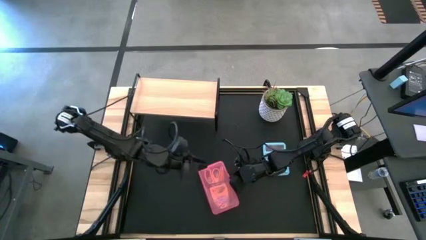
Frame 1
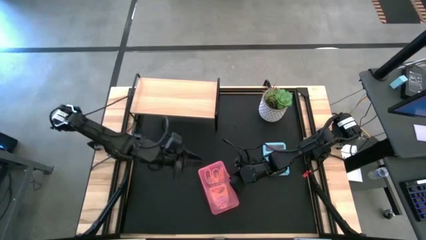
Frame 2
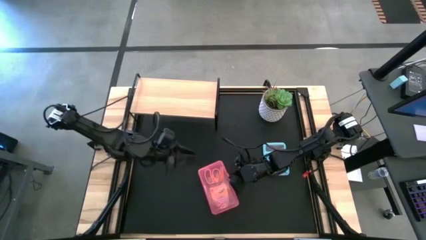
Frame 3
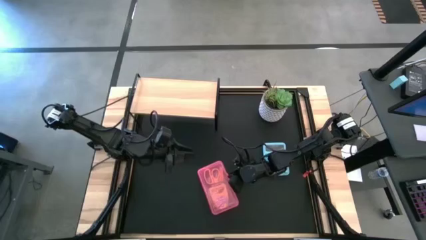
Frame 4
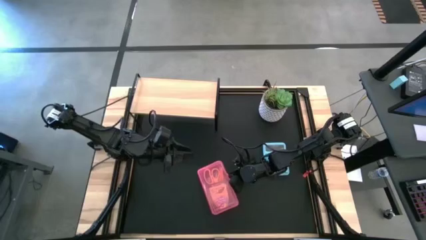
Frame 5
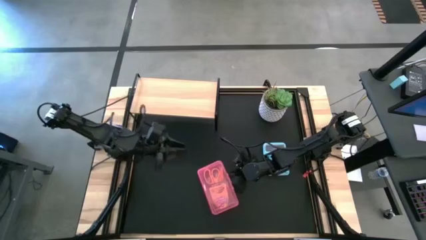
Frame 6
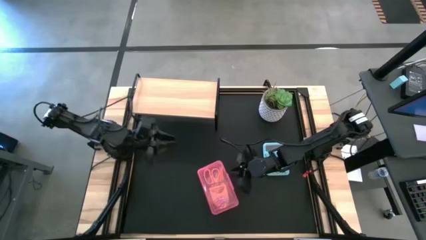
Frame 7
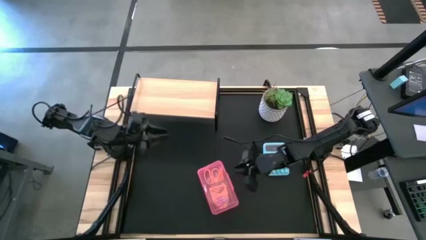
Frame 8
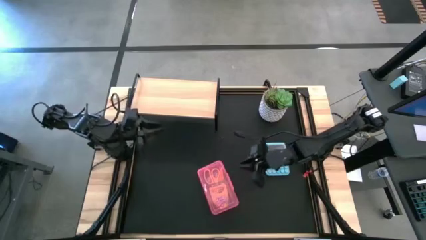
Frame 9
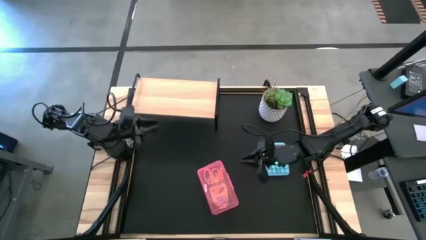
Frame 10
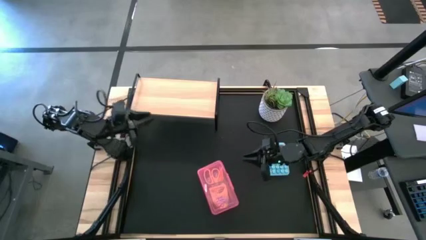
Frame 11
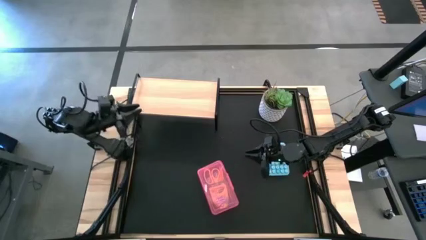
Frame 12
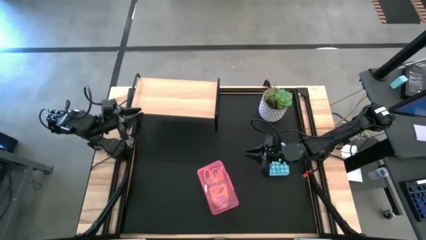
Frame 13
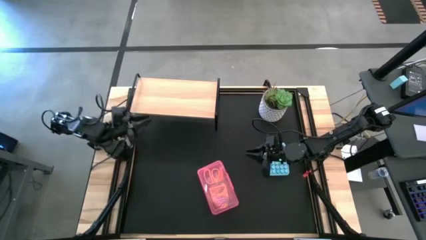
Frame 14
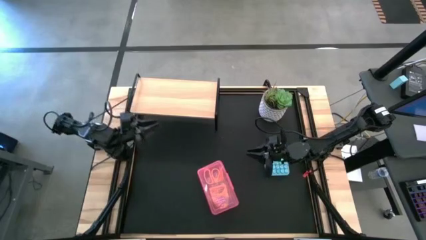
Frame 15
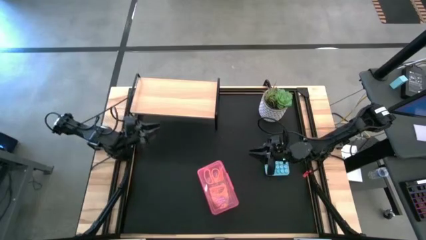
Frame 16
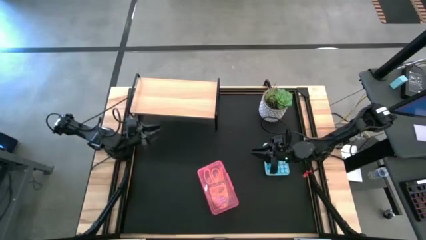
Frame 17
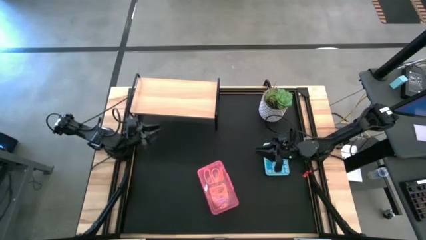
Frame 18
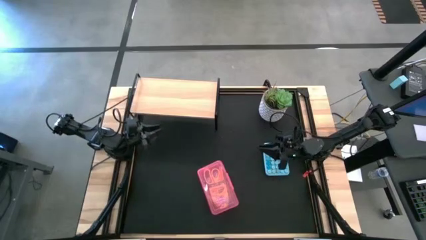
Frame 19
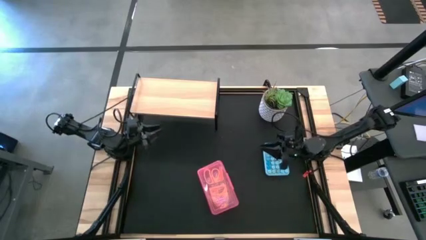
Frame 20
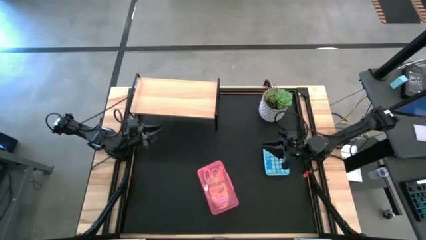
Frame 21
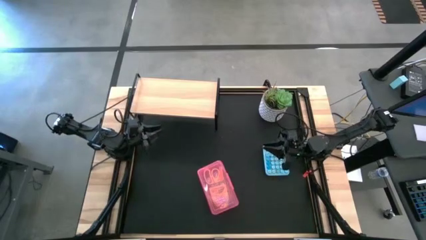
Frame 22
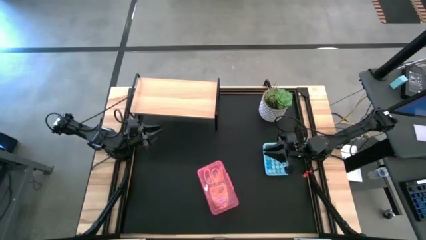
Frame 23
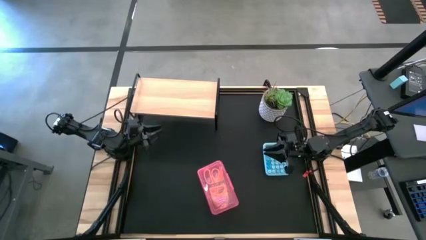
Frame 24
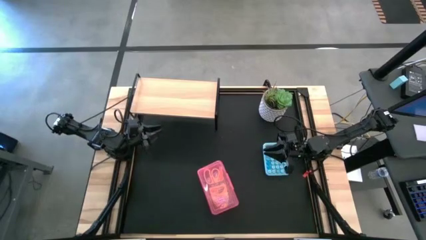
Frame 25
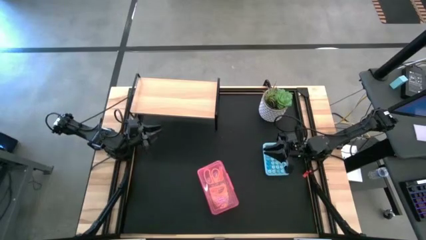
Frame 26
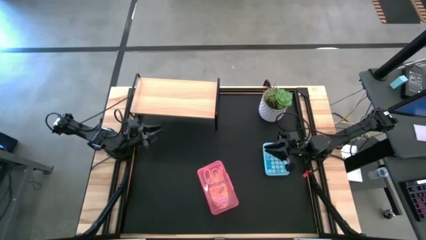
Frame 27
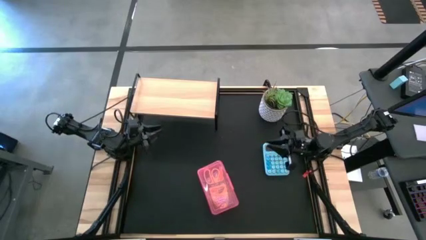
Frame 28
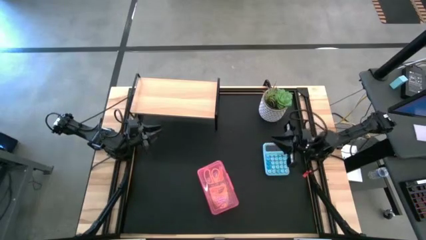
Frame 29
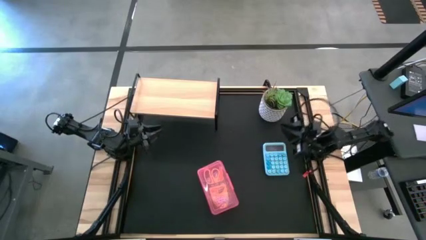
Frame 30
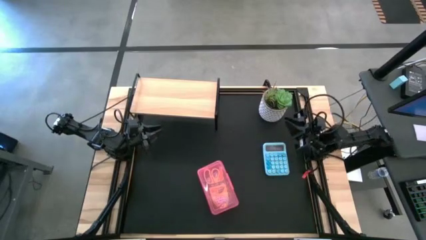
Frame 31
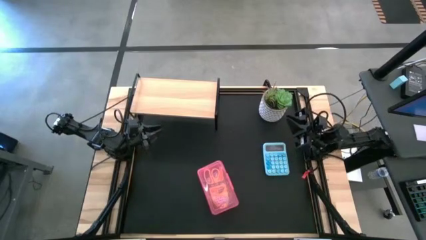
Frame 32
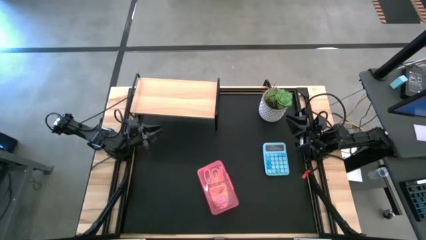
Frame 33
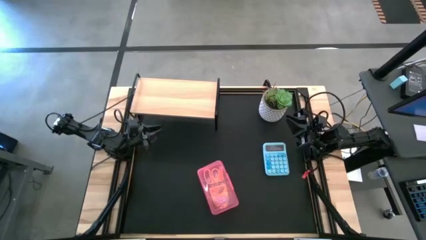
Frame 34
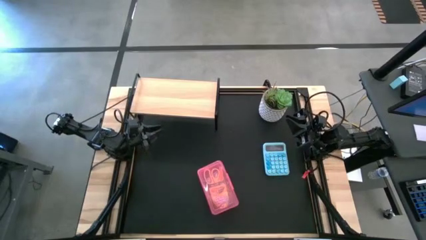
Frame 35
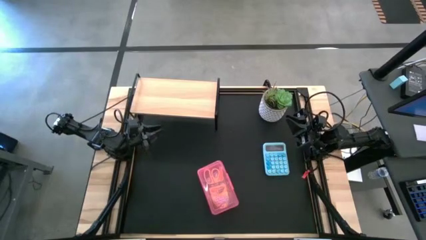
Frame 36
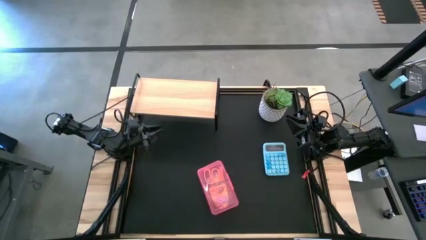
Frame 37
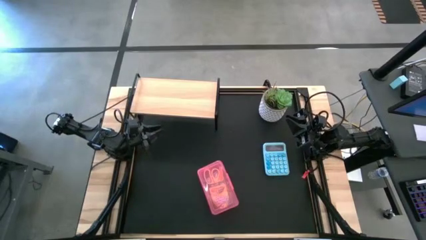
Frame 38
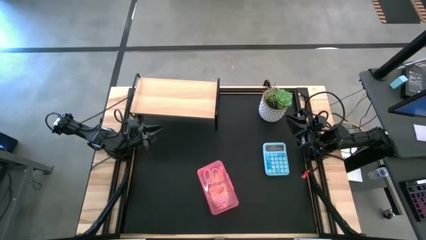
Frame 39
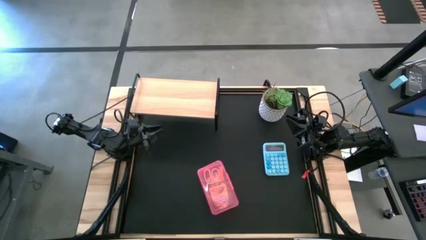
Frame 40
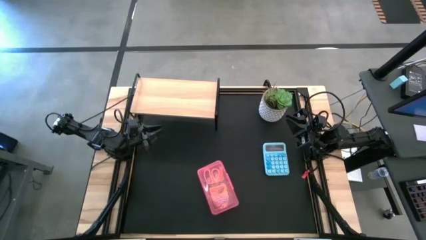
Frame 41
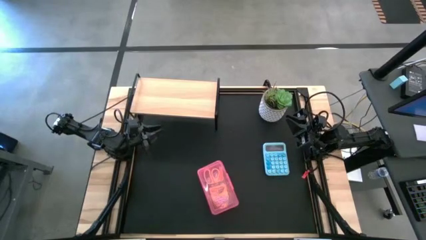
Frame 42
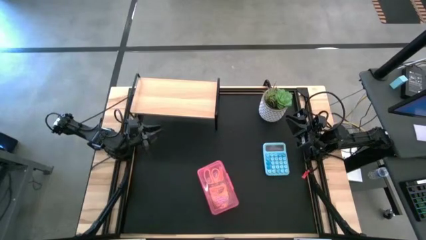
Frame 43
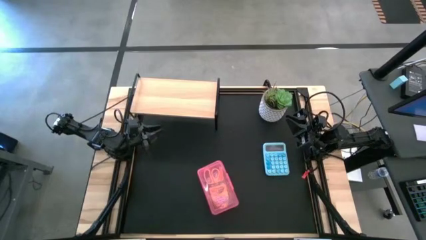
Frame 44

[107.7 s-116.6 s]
Task: Pack school essentials
Return to Home Position

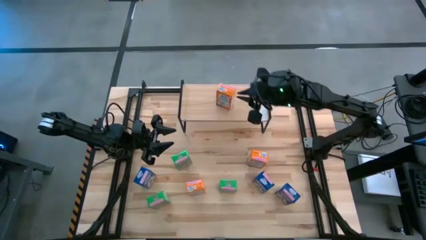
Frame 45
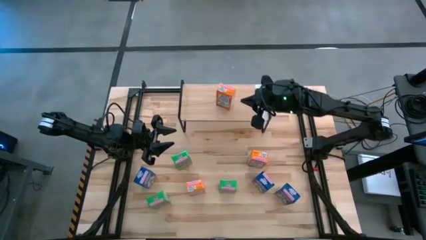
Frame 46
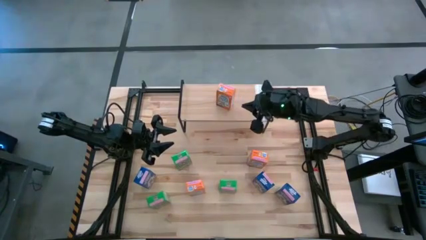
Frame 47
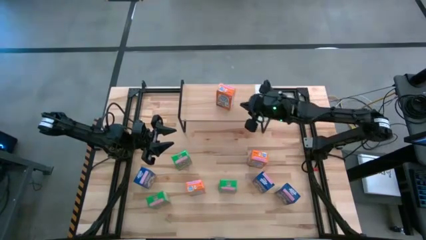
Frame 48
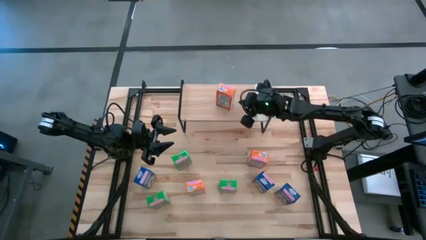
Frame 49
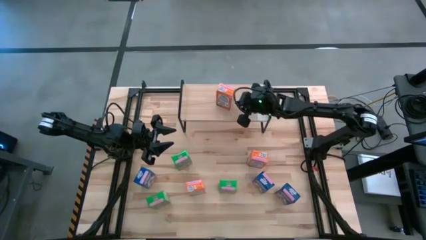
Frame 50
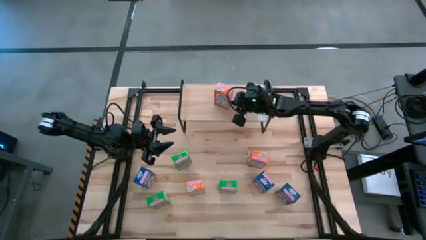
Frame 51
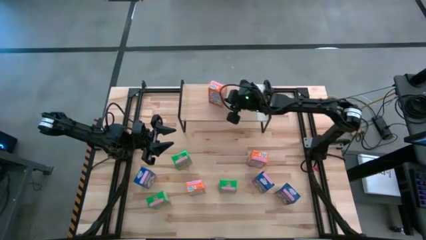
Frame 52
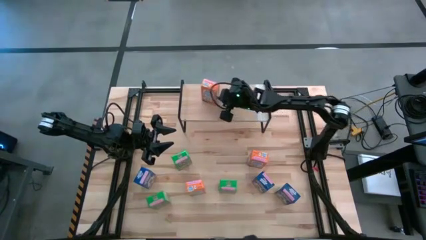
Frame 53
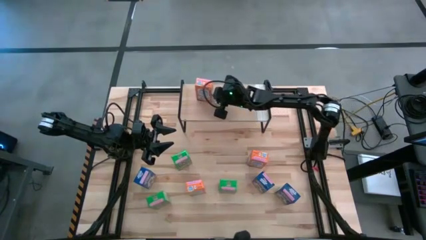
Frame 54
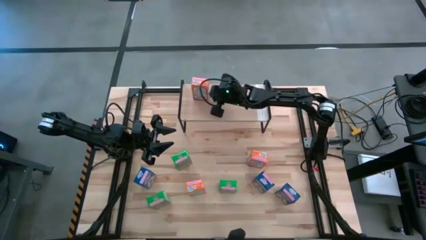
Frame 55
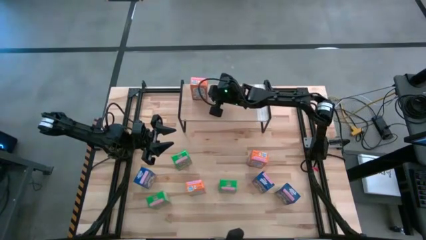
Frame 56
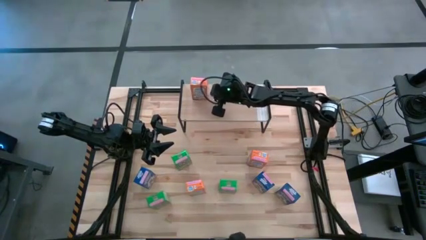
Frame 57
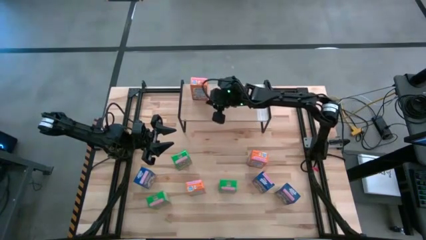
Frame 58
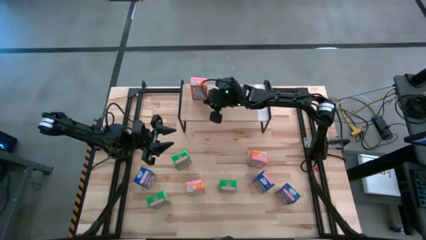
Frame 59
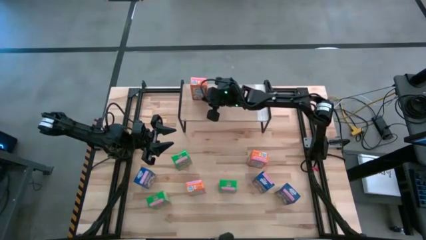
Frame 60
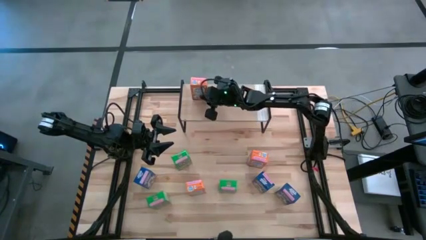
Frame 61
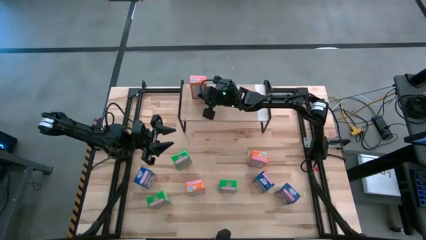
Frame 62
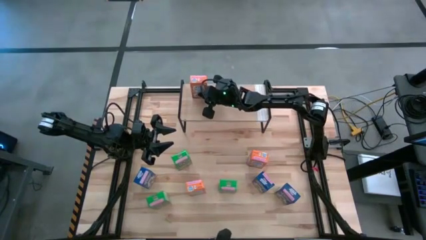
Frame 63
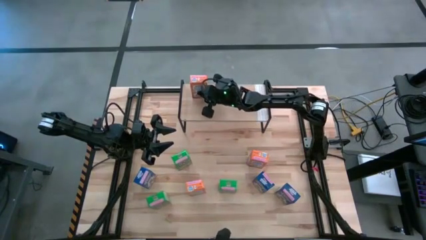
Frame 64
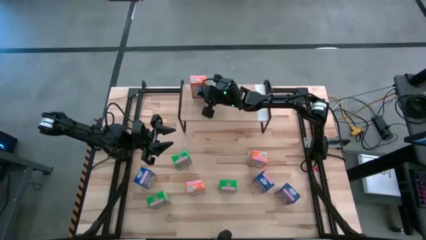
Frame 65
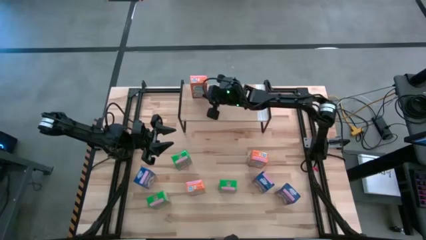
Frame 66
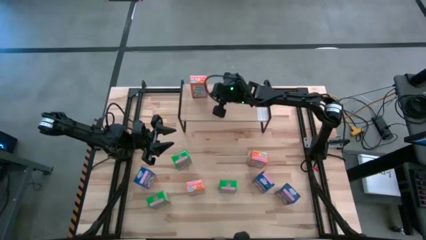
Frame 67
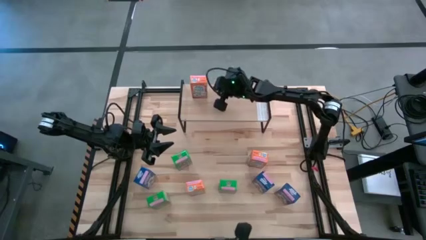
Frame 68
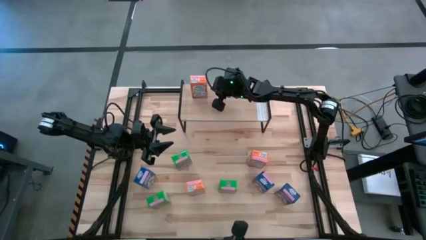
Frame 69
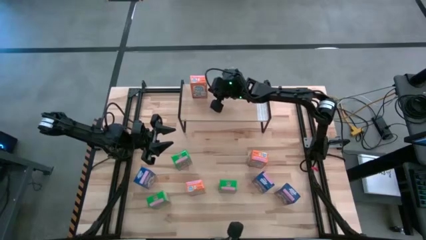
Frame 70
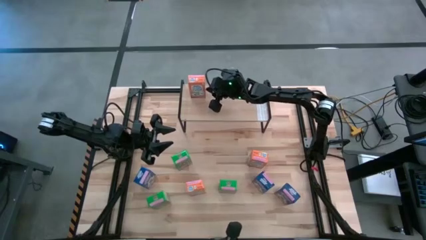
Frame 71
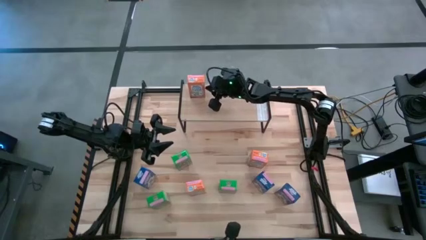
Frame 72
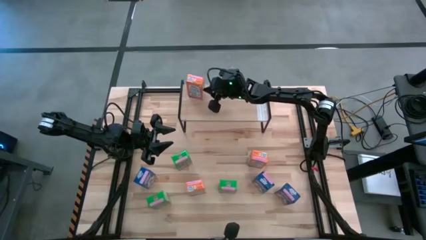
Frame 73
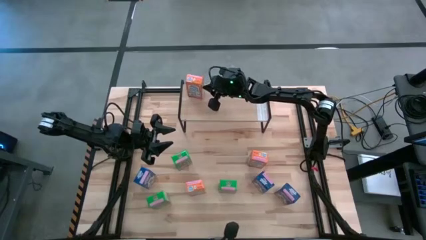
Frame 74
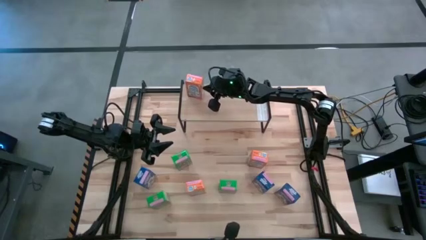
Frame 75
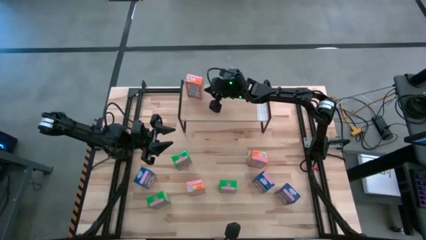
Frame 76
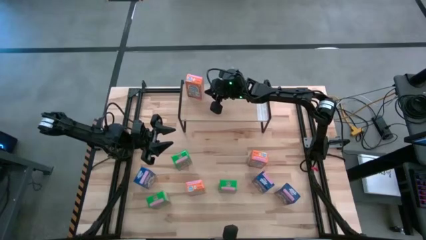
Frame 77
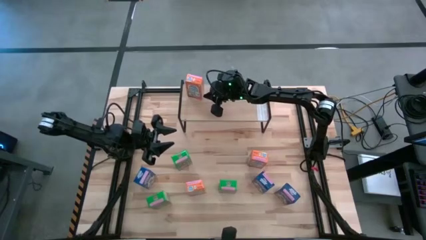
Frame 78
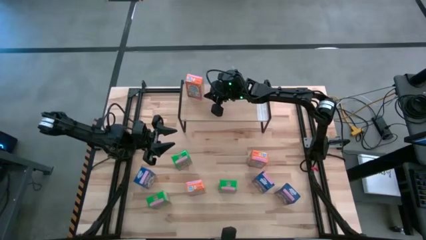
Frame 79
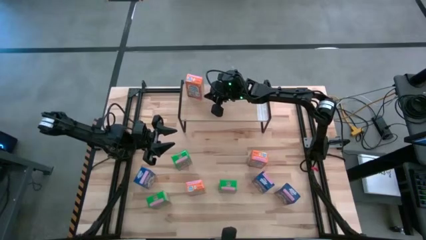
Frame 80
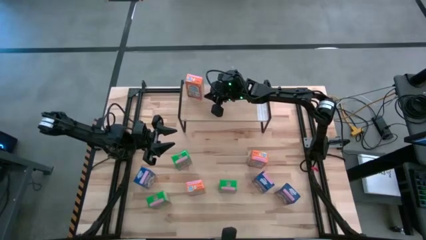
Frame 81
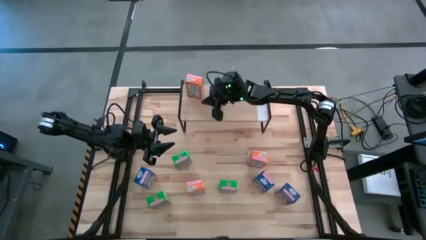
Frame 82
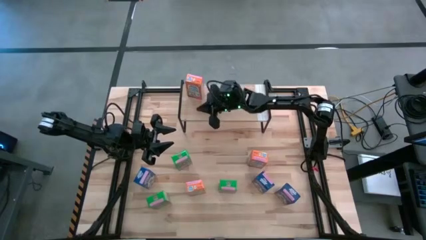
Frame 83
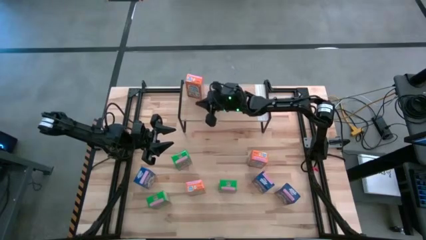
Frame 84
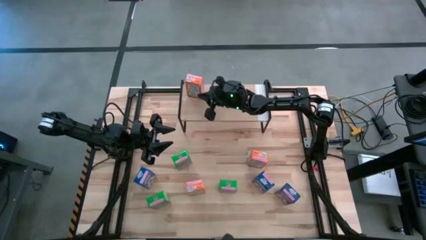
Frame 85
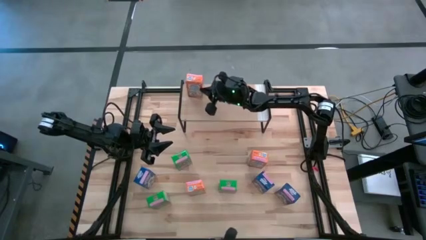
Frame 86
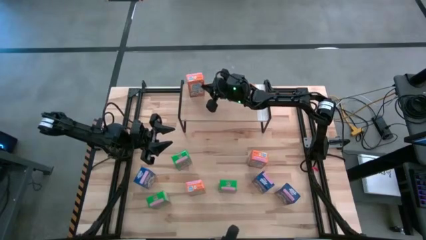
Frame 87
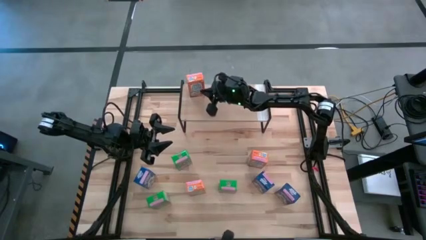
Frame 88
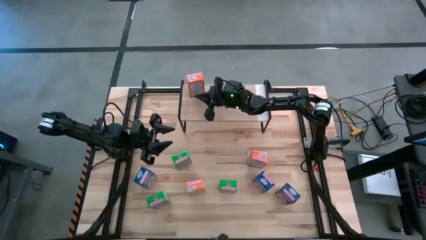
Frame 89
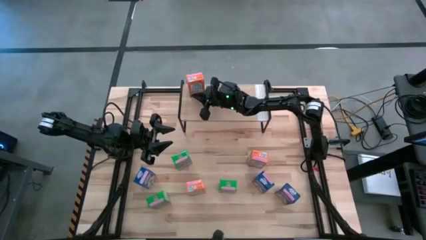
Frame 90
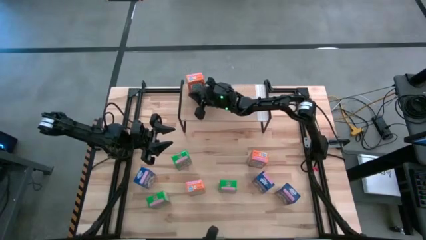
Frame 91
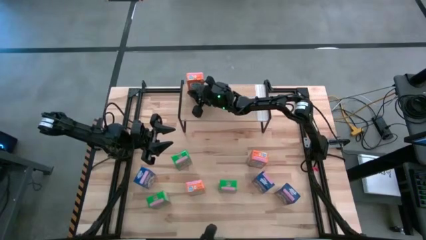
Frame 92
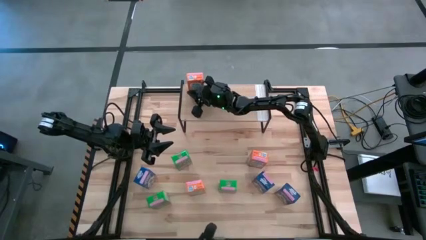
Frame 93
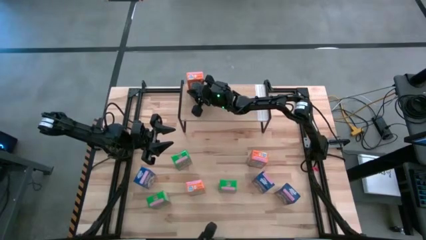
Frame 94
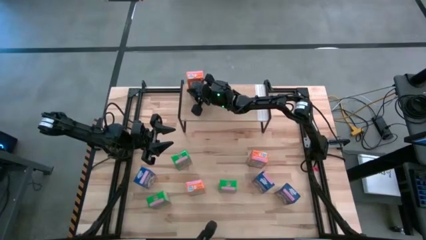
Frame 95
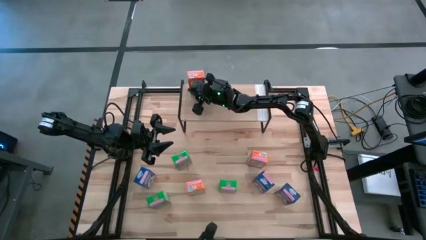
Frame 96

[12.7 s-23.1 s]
Task: Stack cereal on shelf
Put the top middle orange cereal box on the shelf
